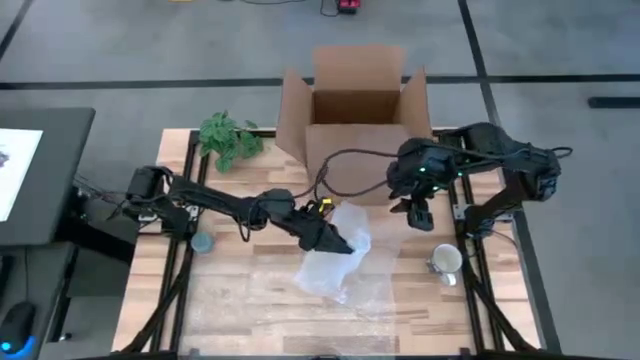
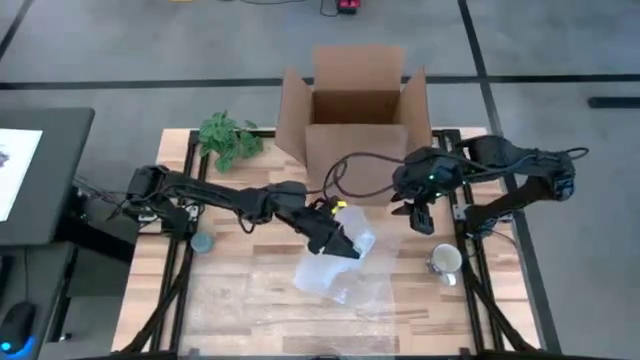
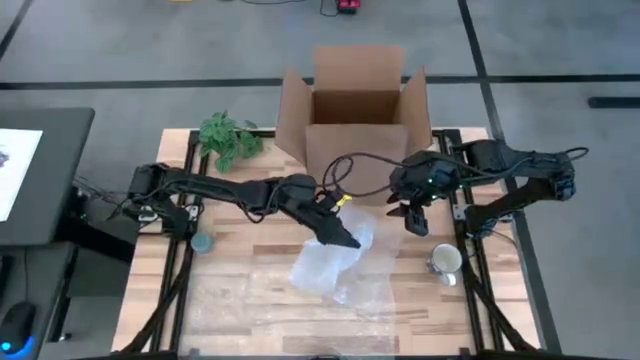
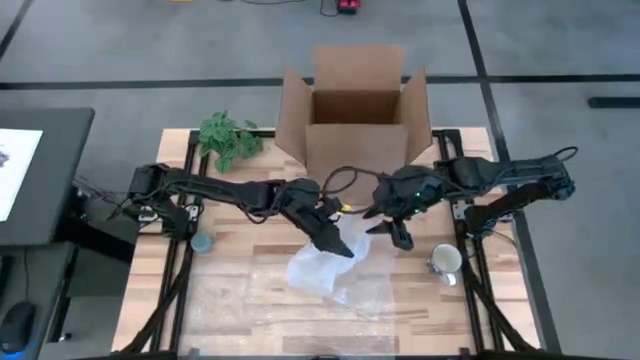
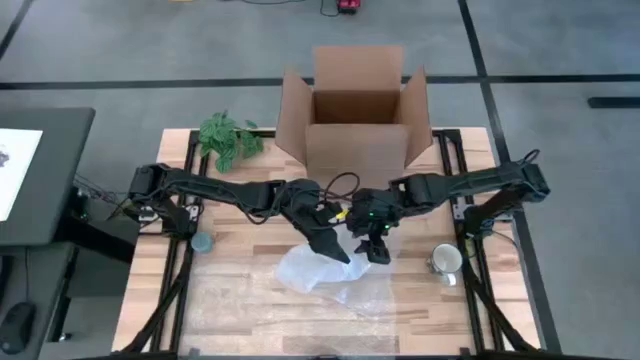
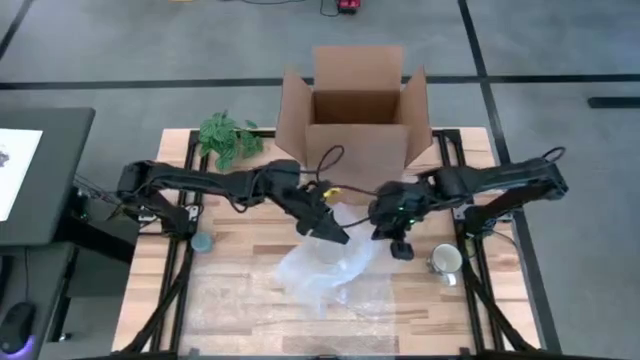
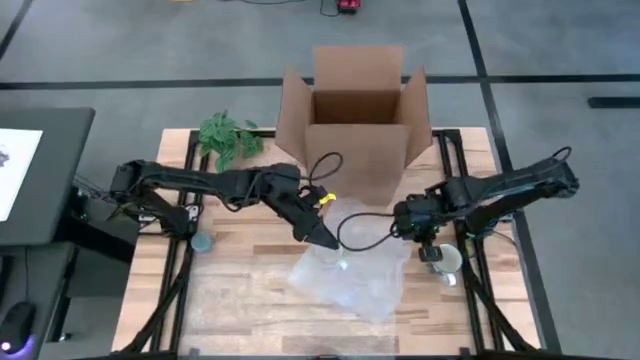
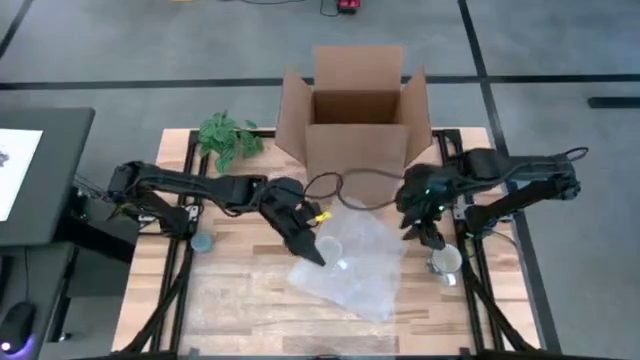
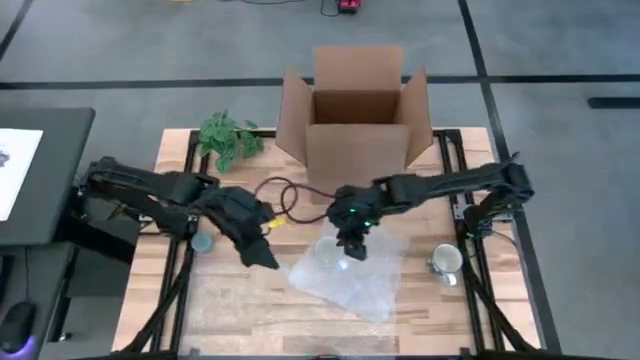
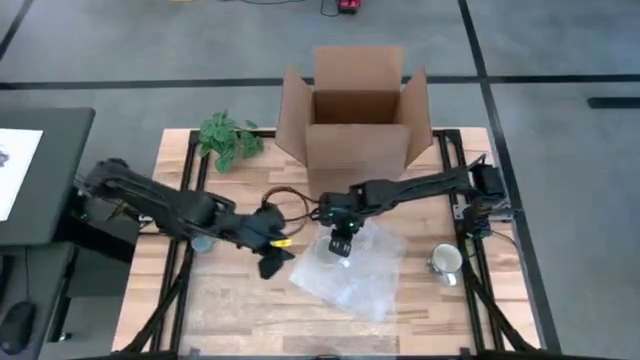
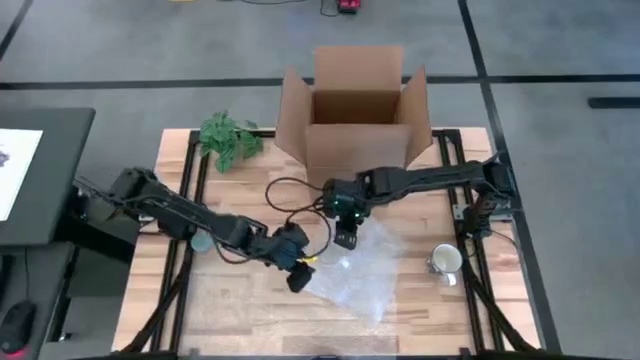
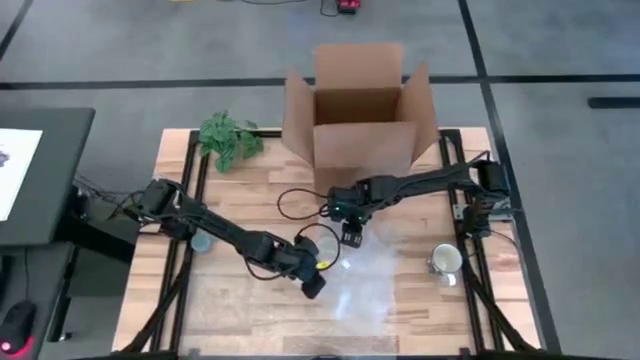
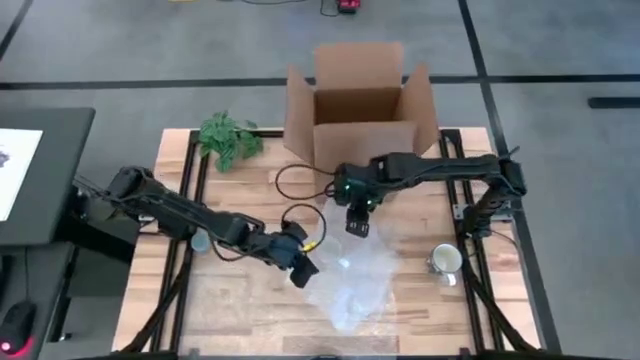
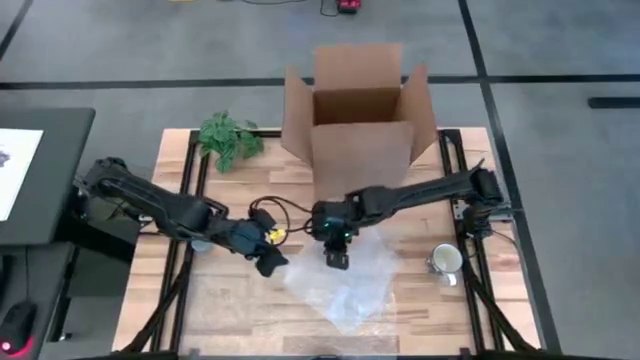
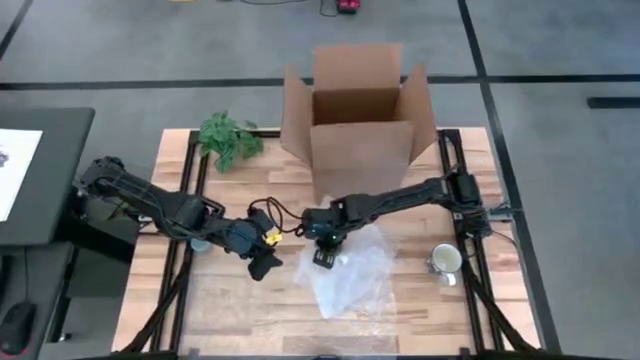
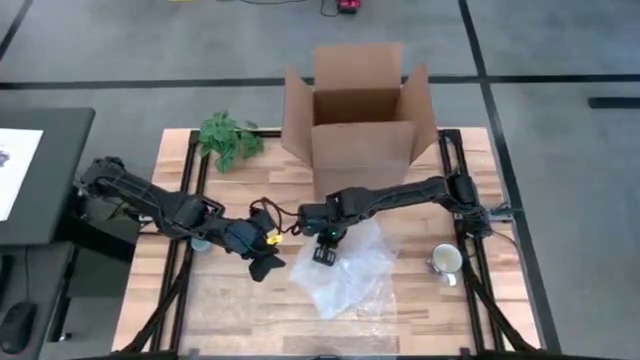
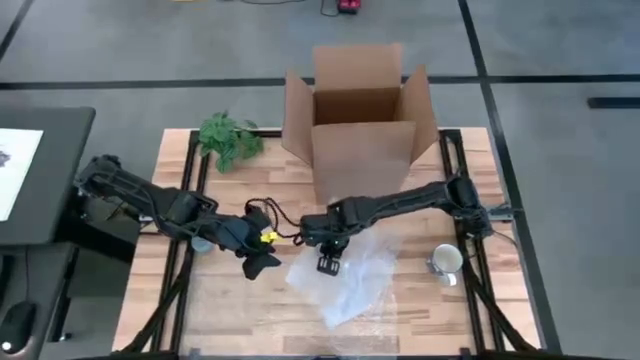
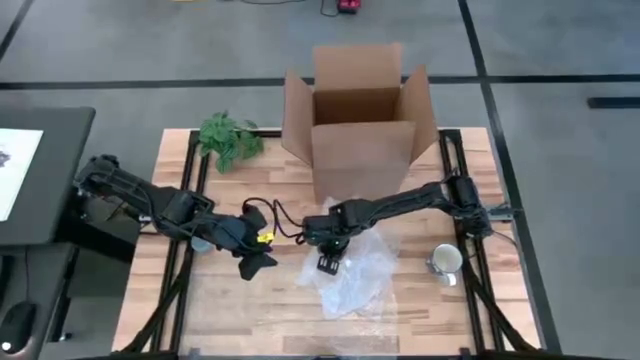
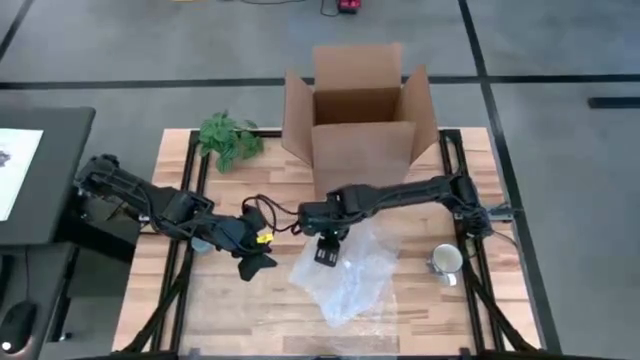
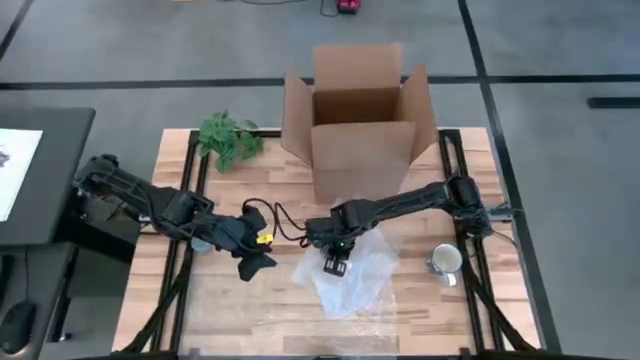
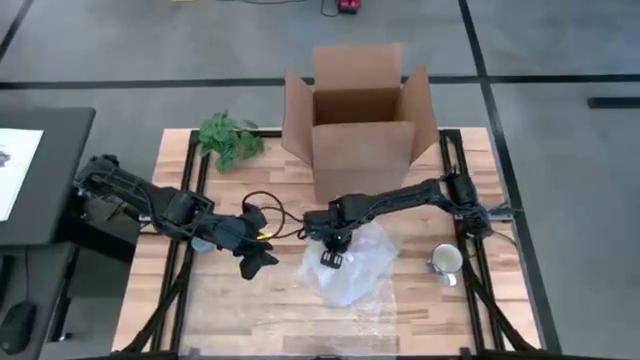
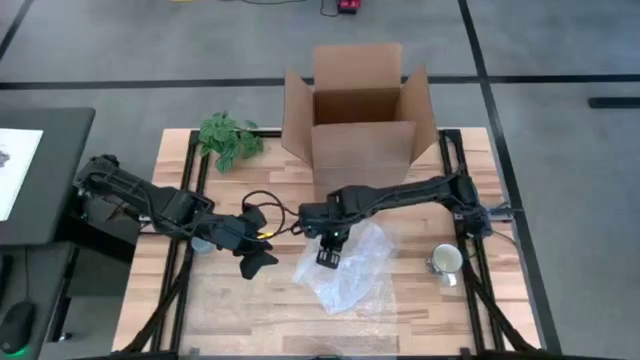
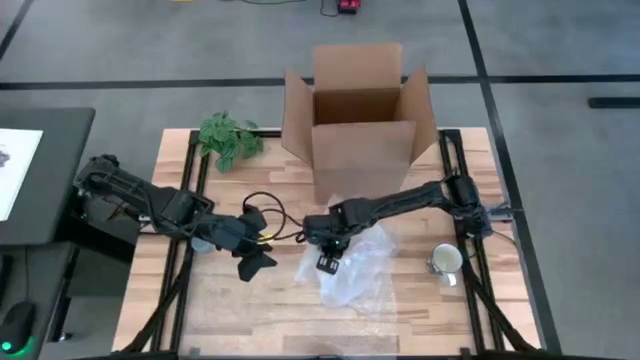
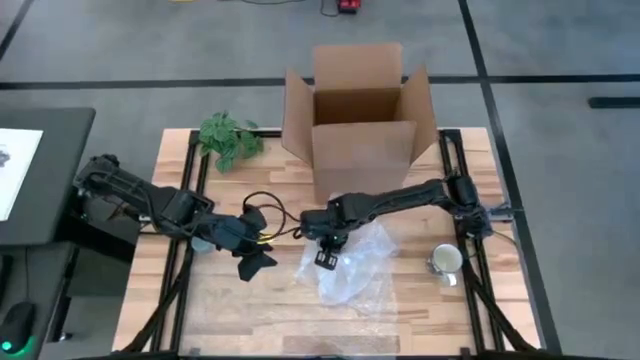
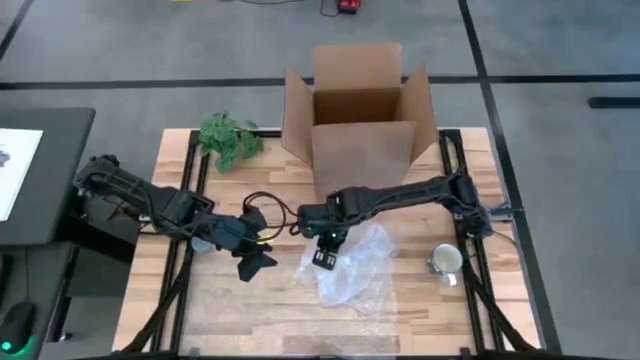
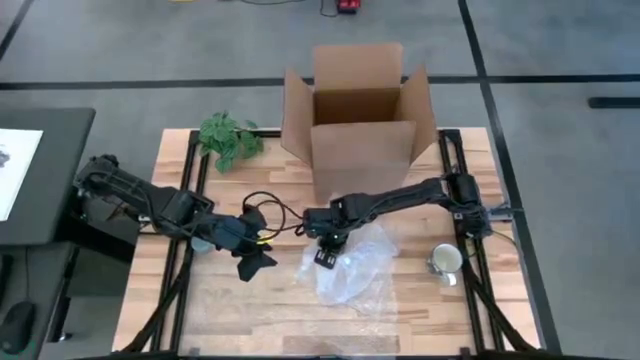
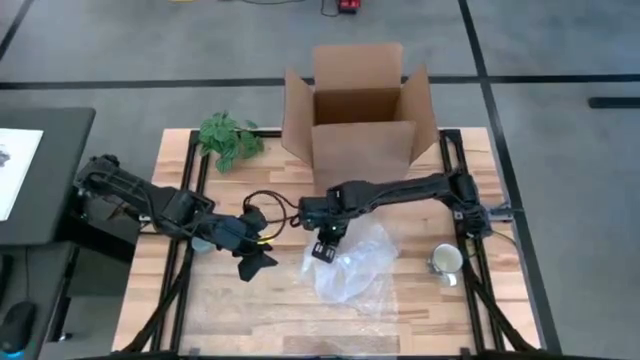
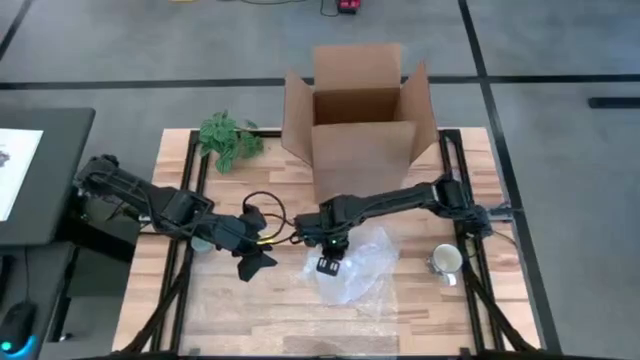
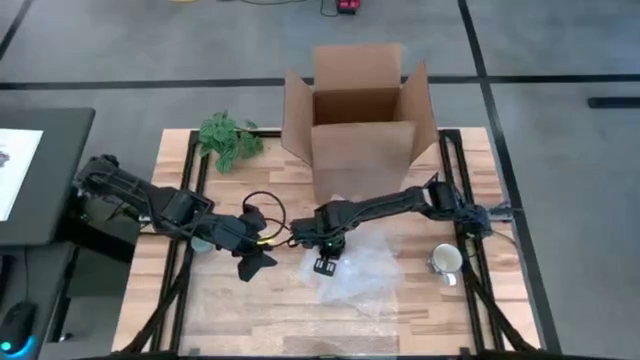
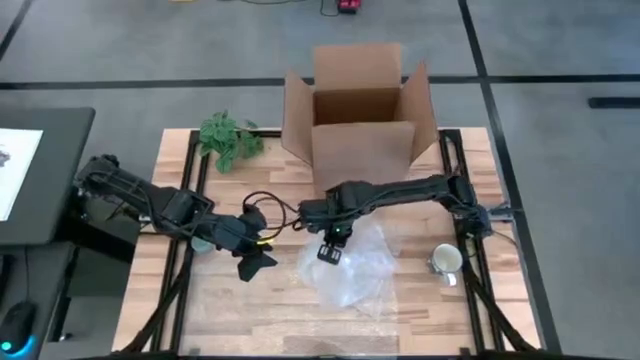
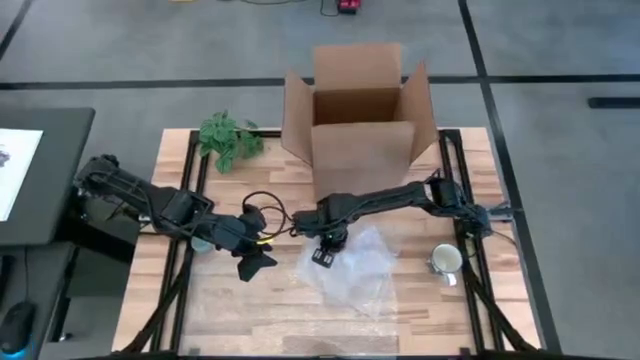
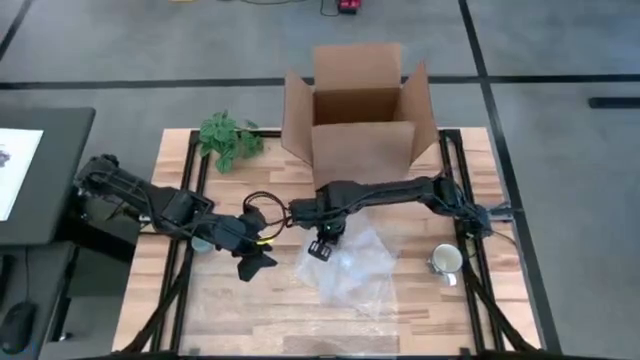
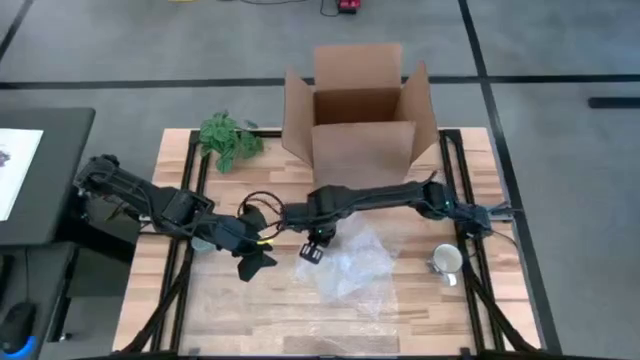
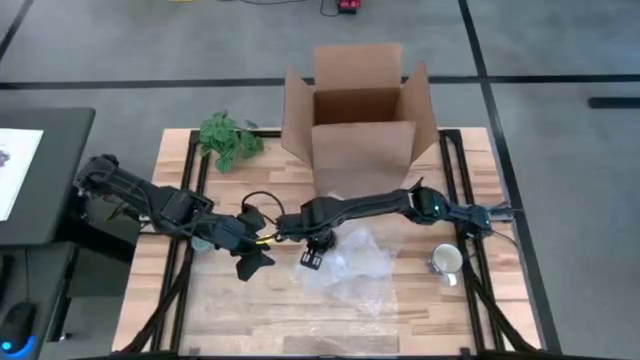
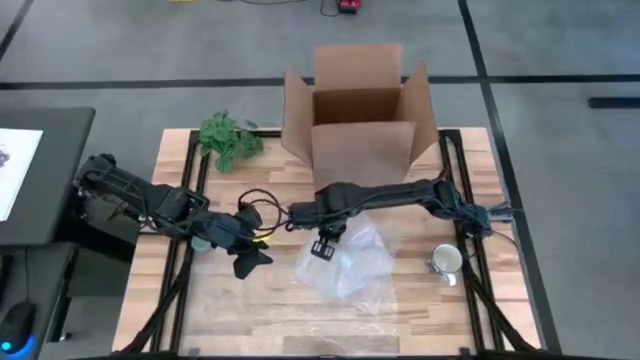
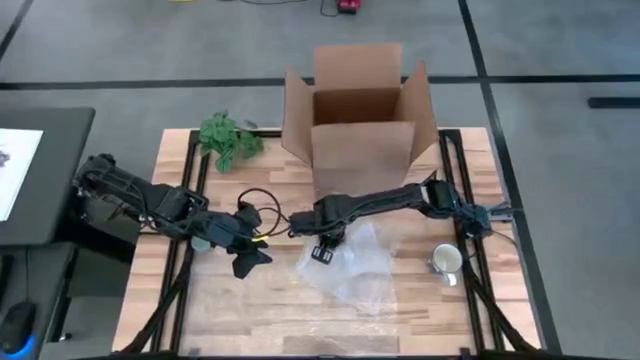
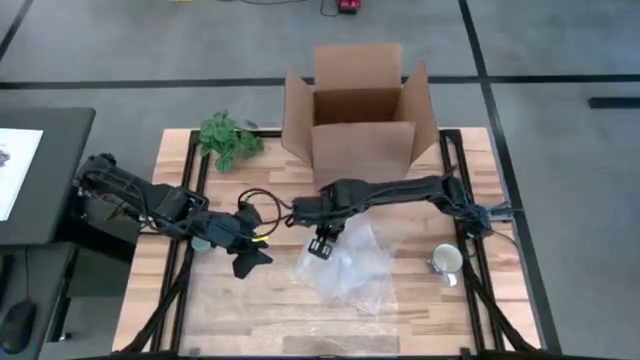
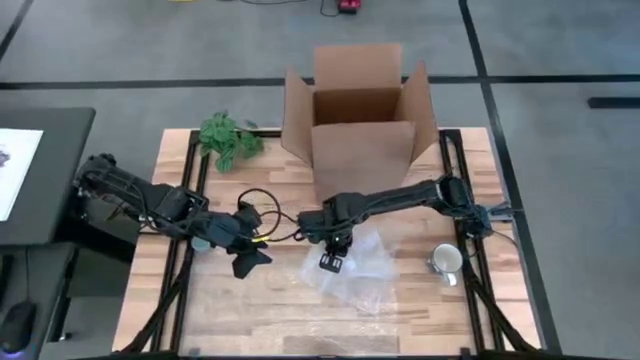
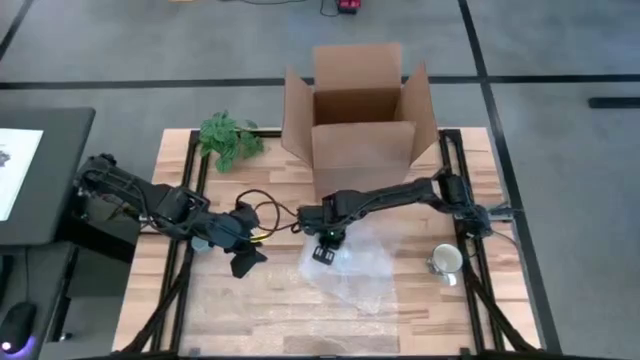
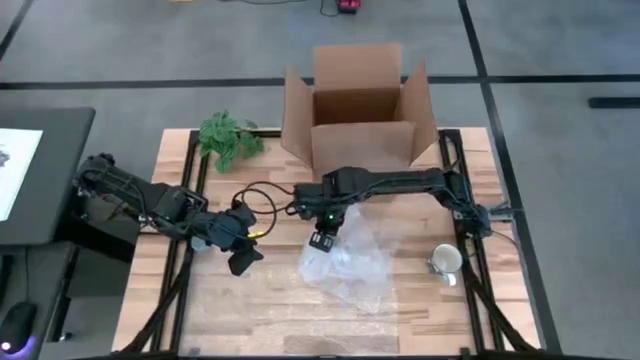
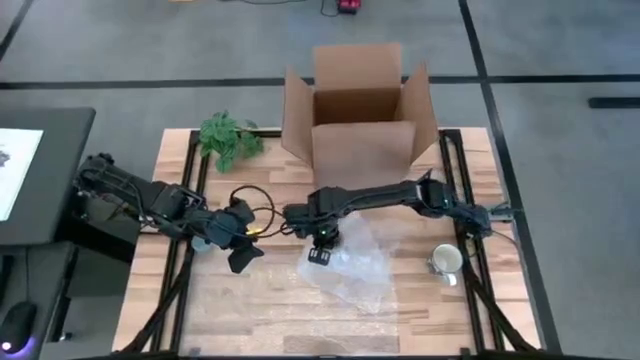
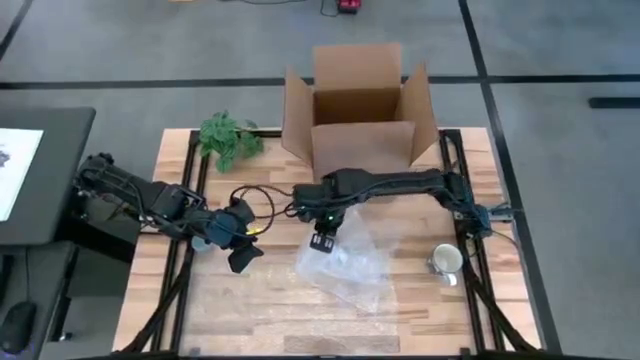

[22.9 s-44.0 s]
Task: wrap mug
Wrap the white mug with bubble wrap
